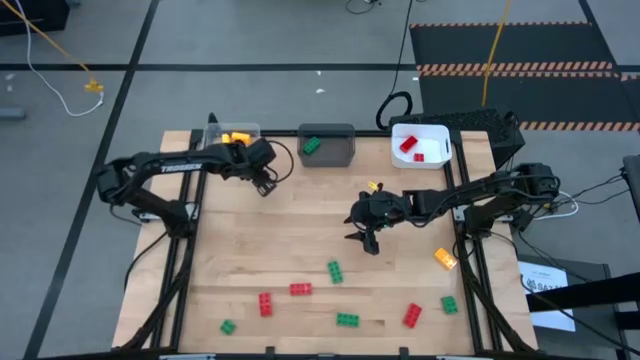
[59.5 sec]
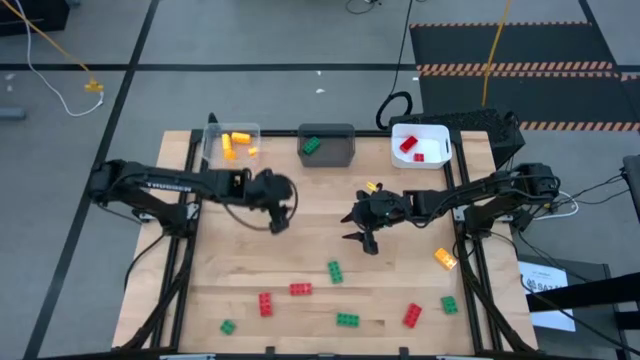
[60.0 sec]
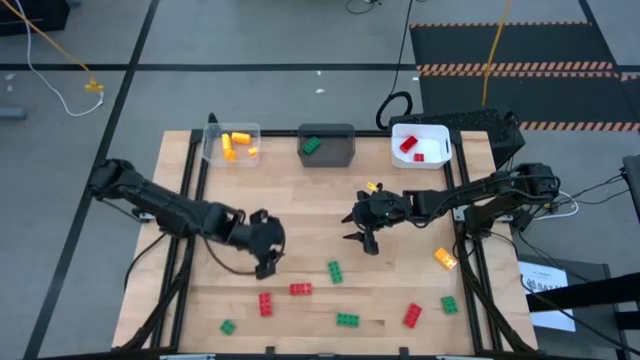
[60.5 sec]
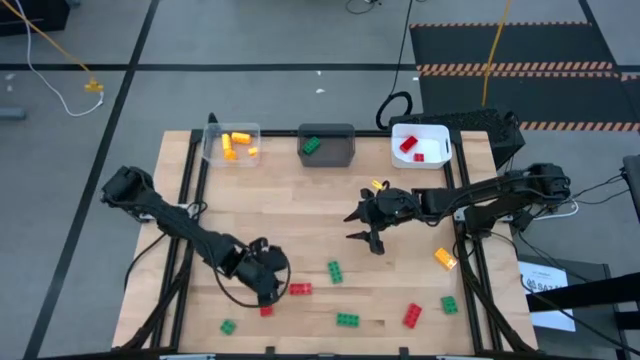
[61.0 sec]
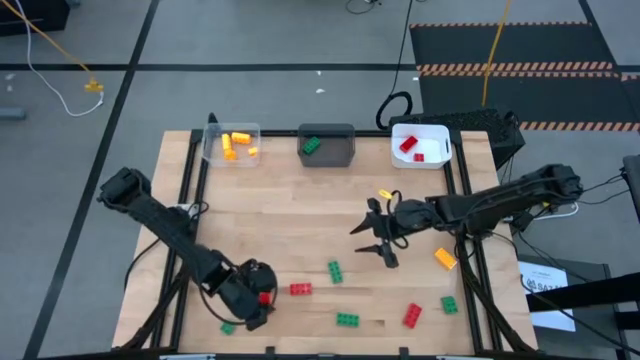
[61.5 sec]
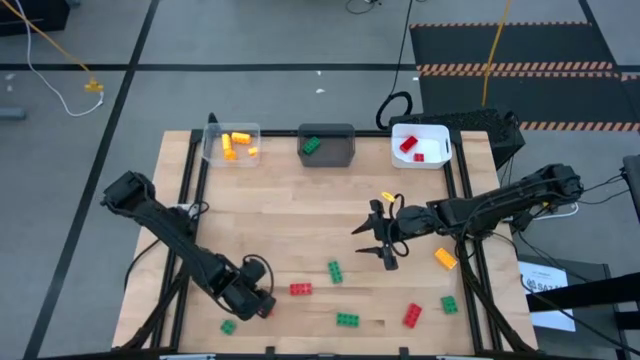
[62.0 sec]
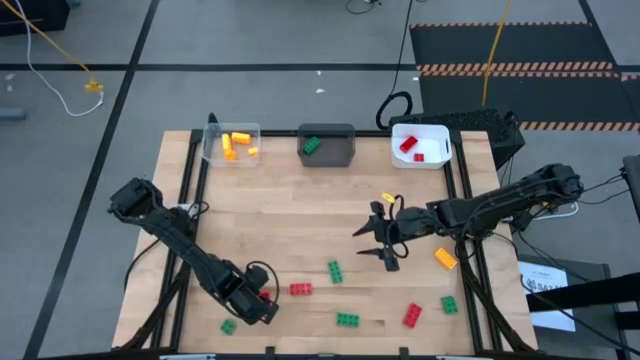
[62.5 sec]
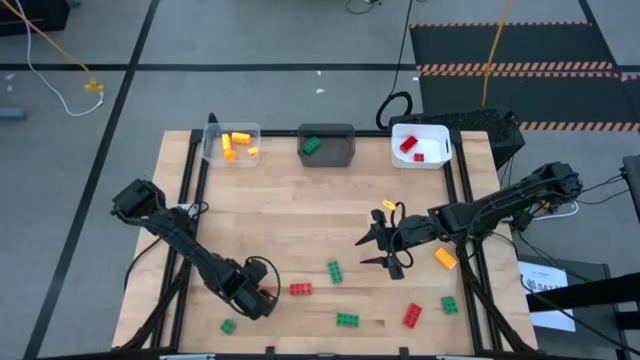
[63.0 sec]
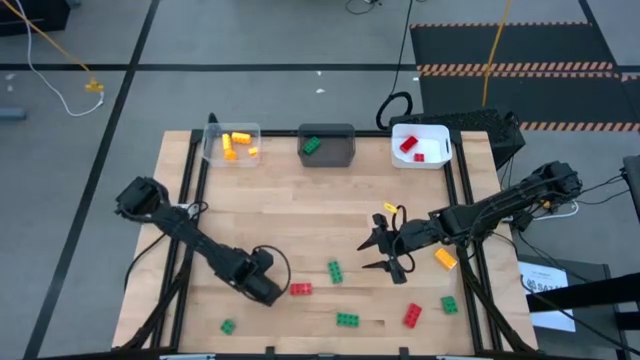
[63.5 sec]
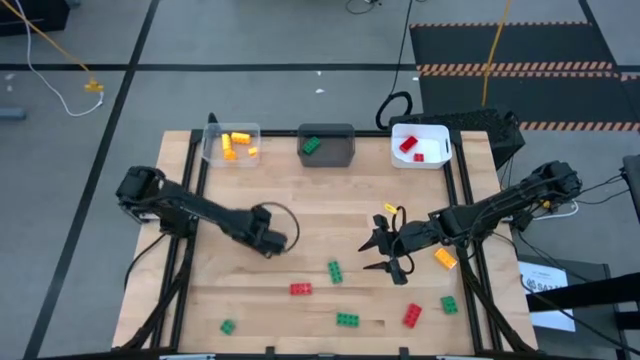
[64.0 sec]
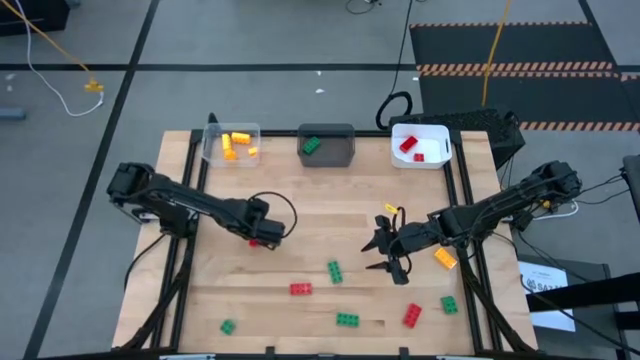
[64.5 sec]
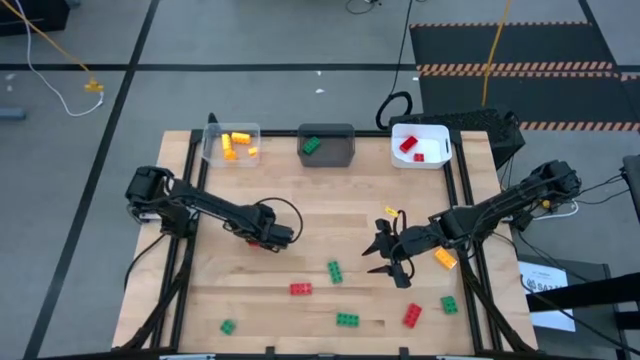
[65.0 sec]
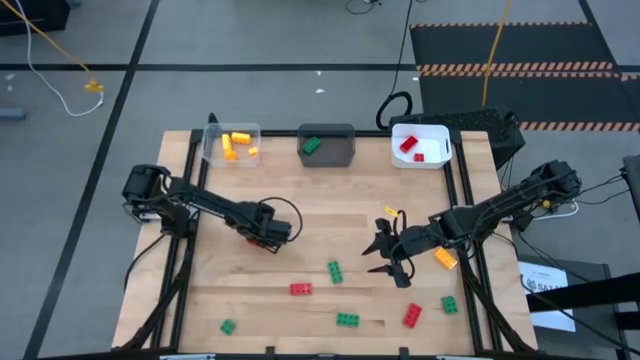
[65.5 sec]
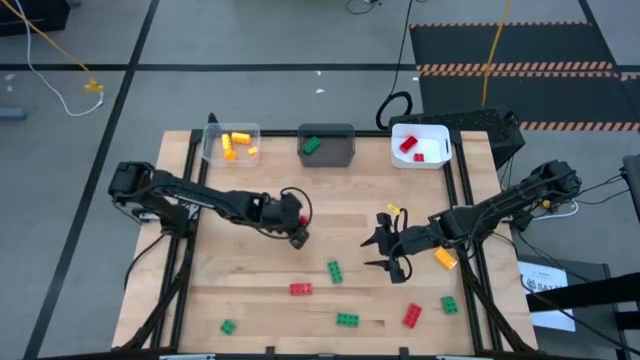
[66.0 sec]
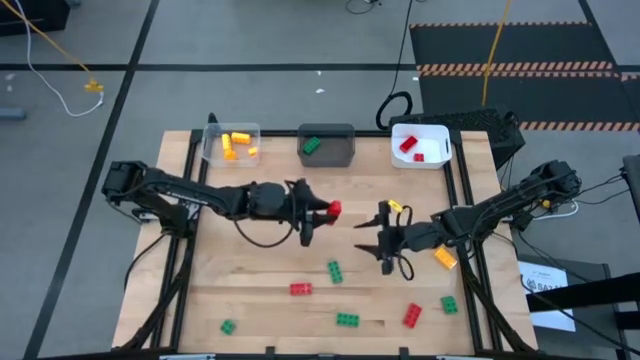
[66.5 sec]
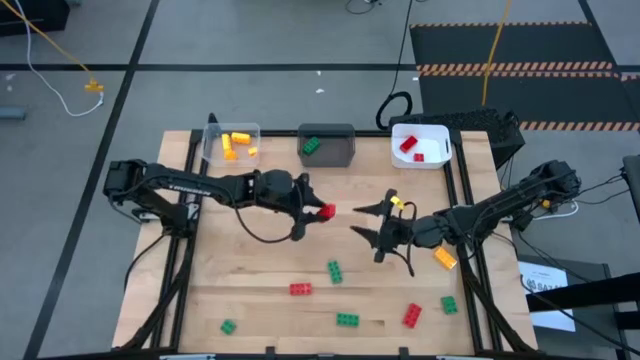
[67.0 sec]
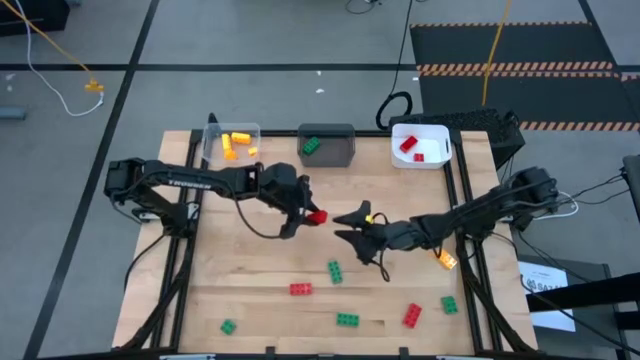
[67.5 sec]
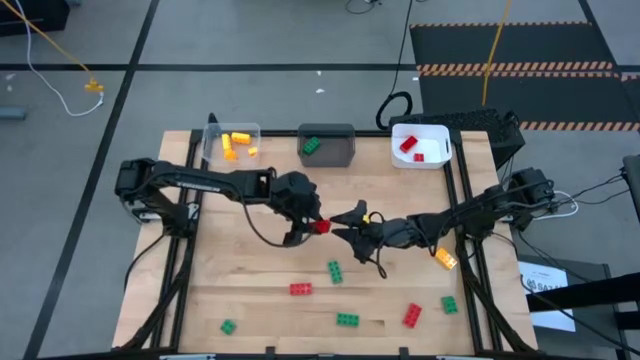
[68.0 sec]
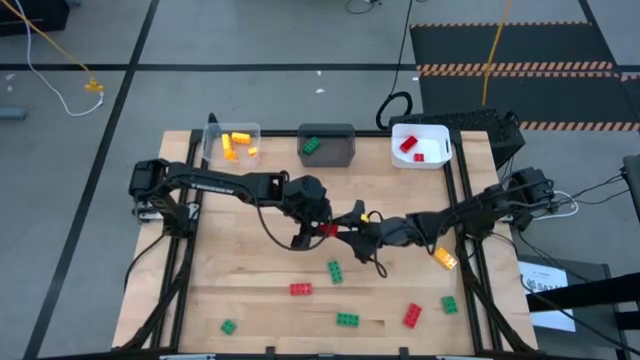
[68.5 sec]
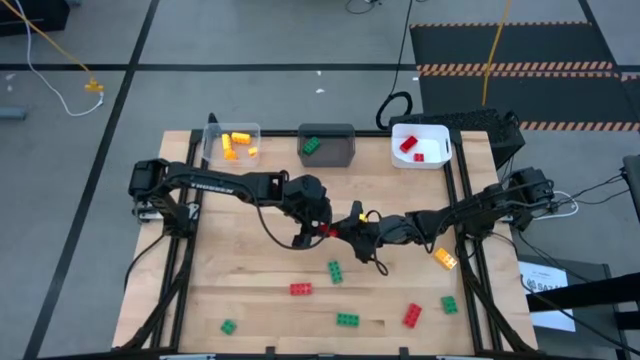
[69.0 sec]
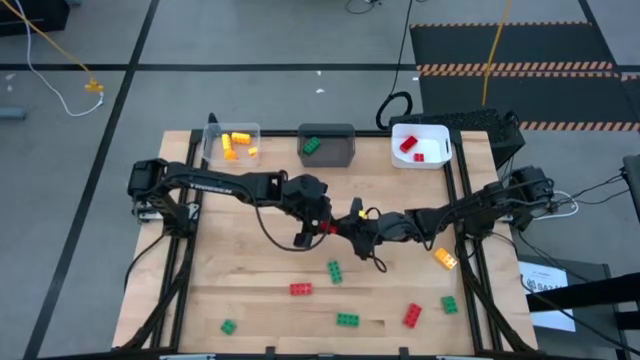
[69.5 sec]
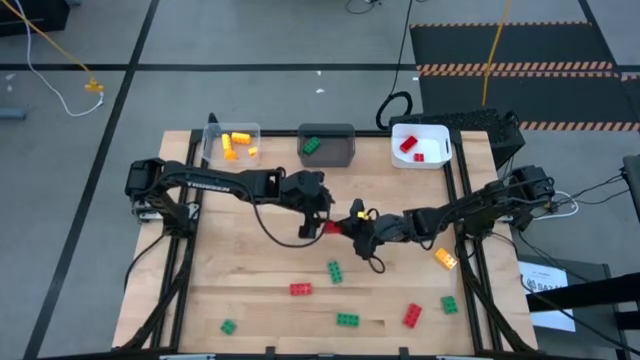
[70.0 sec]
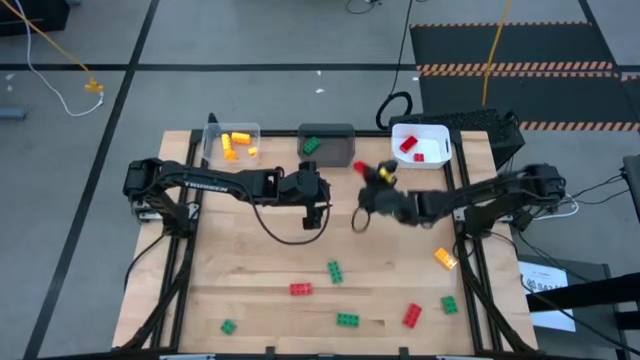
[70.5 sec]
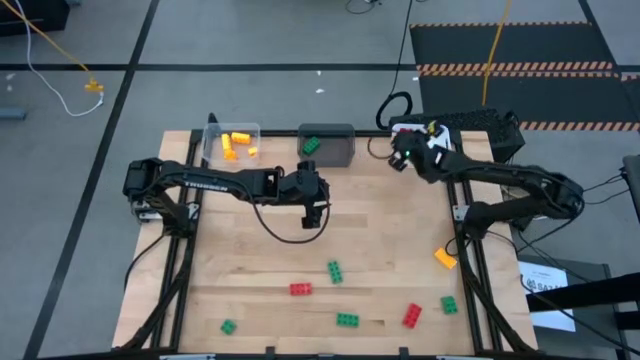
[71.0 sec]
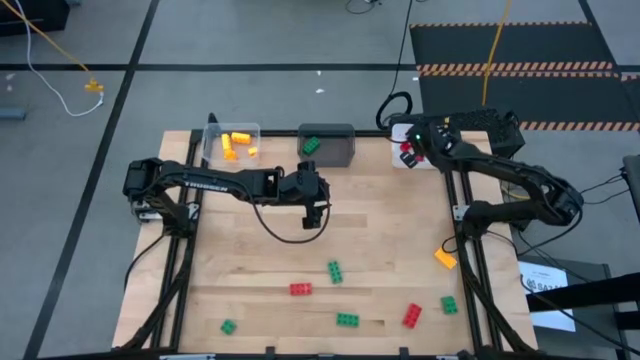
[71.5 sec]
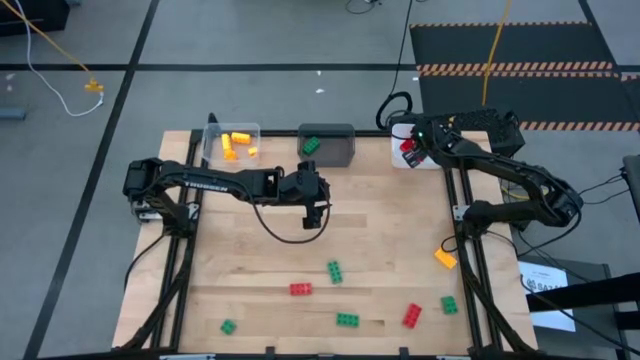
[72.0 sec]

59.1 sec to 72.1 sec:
Task: Sort & place blocks by color
Put the left 8 stud red game piece into the white bin

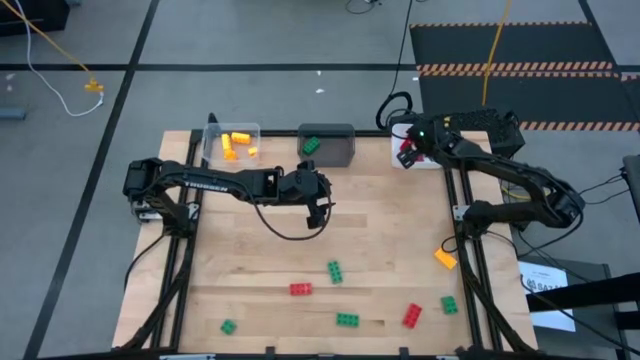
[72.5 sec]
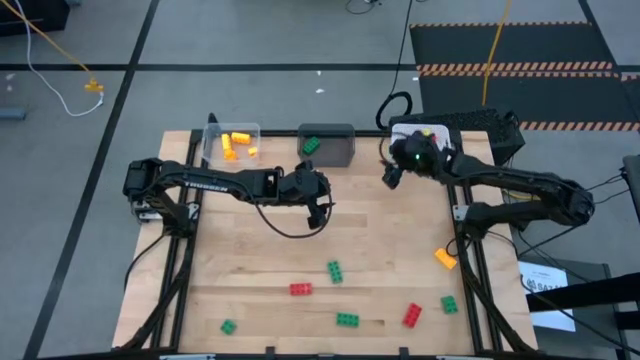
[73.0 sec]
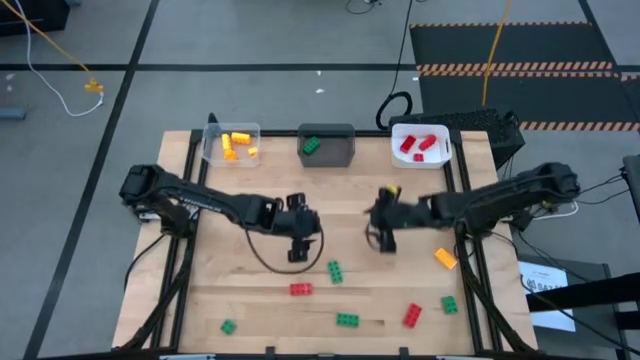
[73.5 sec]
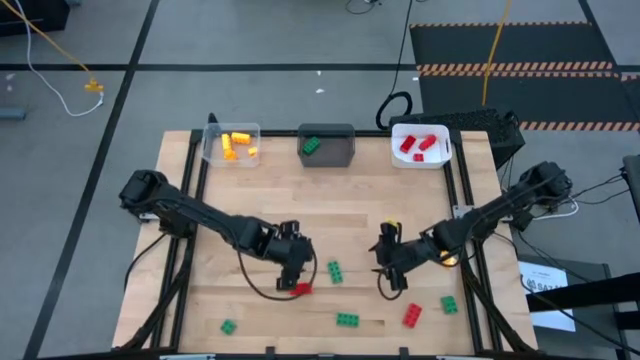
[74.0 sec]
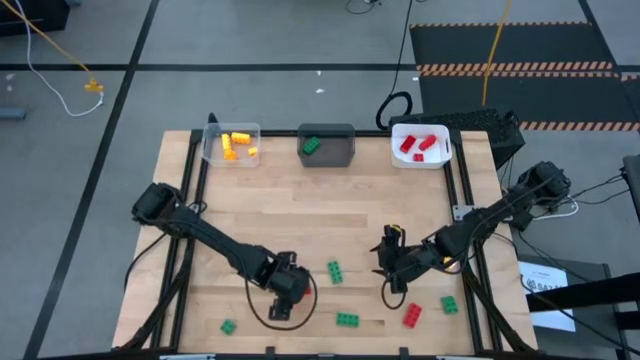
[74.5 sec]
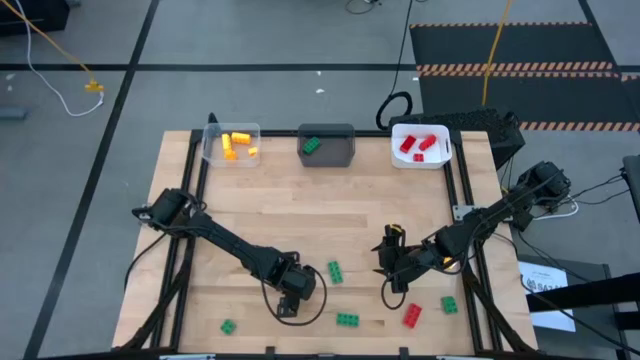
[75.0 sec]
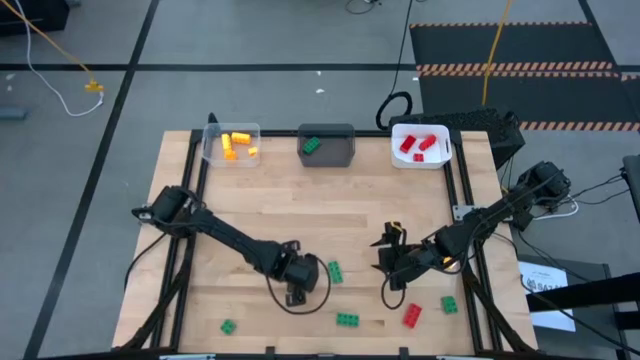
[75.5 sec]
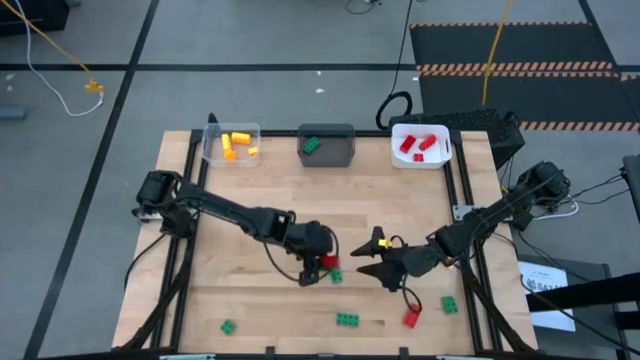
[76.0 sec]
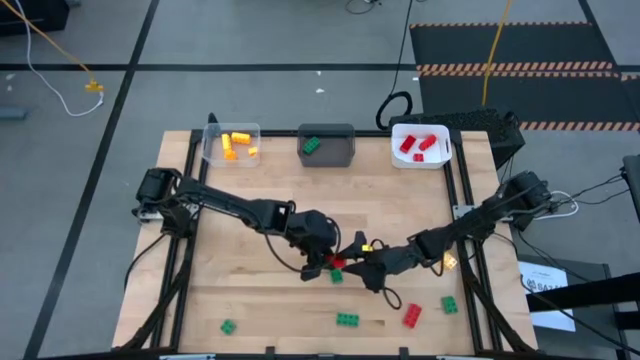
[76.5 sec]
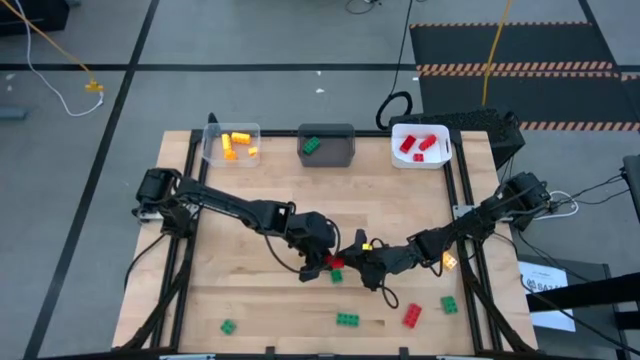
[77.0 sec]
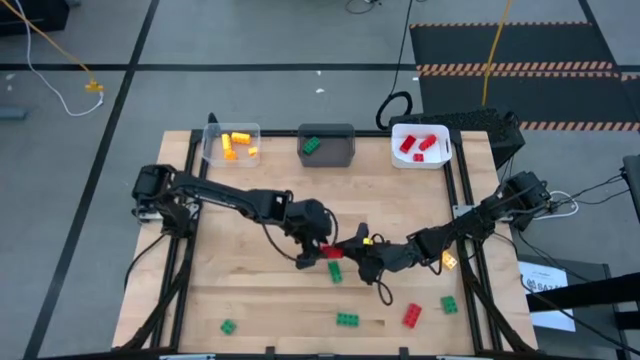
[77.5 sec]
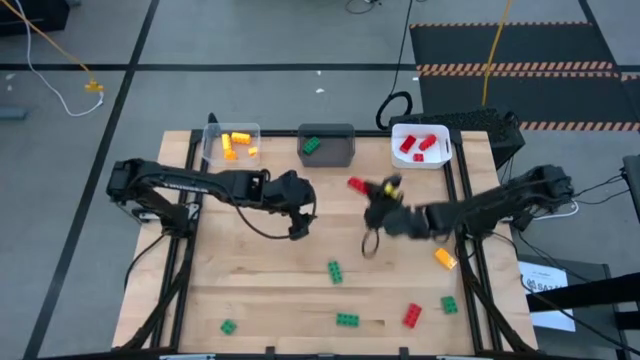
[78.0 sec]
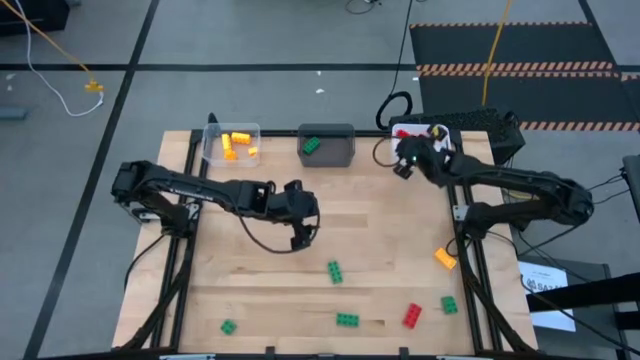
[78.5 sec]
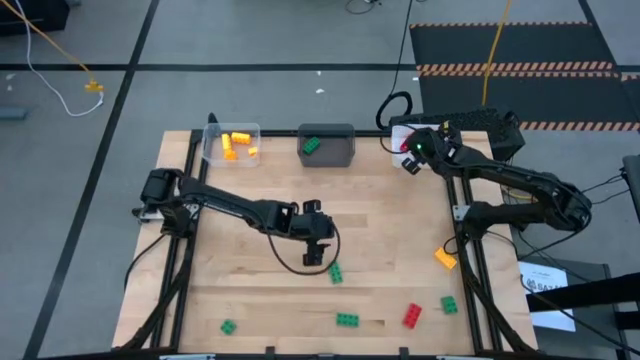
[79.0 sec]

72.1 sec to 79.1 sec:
Put the left 8 stud red game piece into the white bin

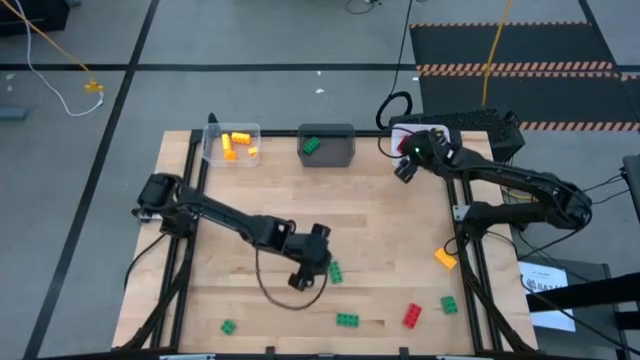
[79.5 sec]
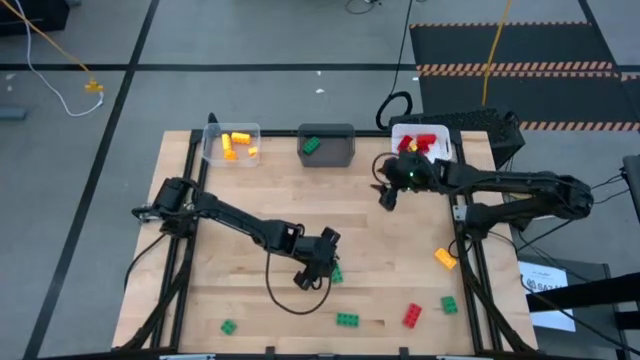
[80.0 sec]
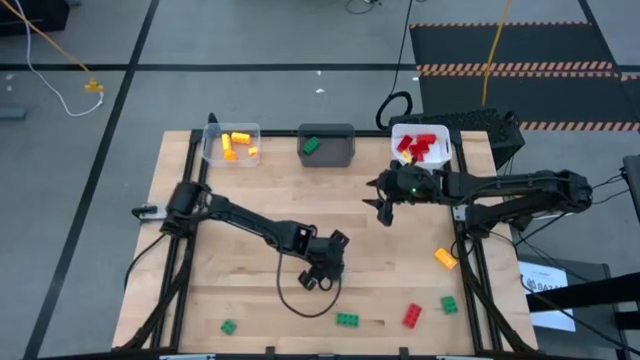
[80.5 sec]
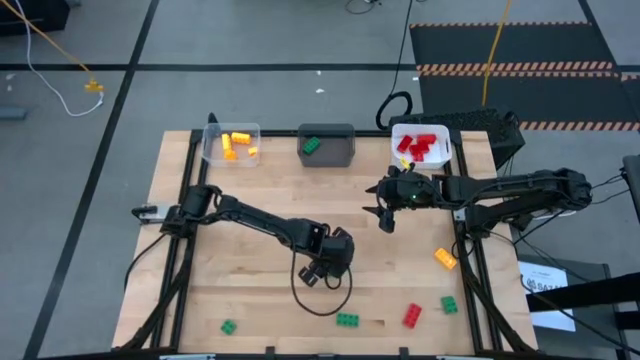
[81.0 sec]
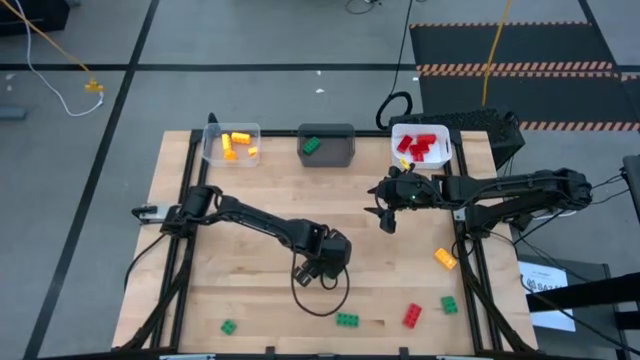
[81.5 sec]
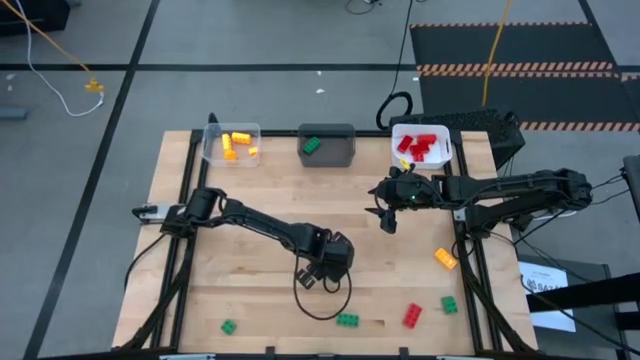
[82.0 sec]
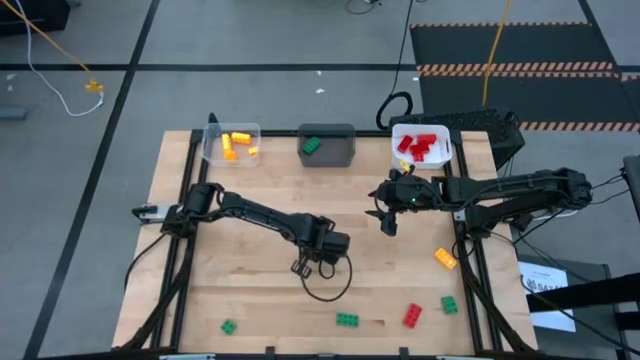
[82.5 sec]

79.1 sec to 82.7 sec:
Put the left 8 stud green game piece into the gray bin
